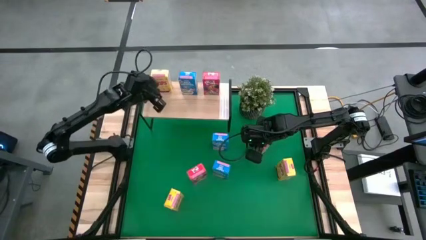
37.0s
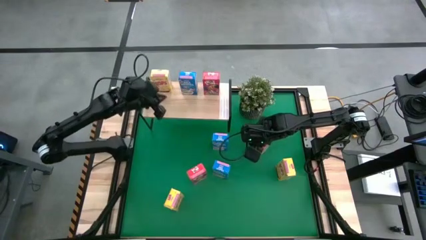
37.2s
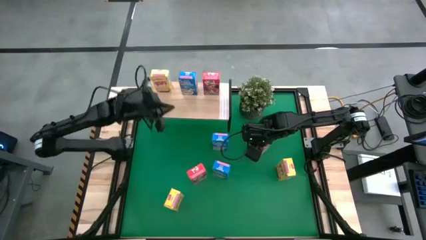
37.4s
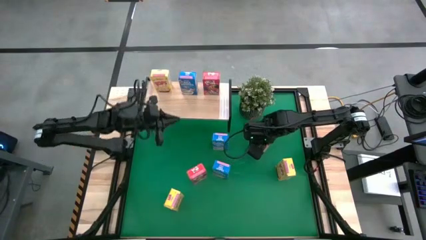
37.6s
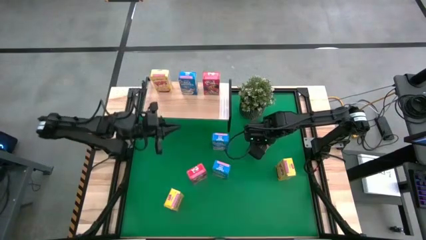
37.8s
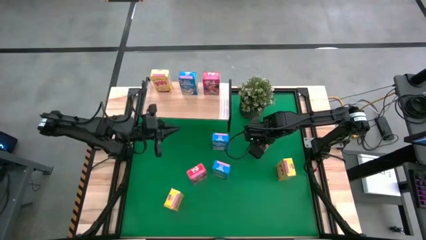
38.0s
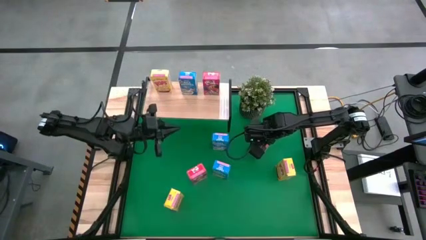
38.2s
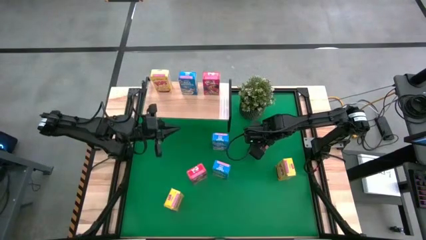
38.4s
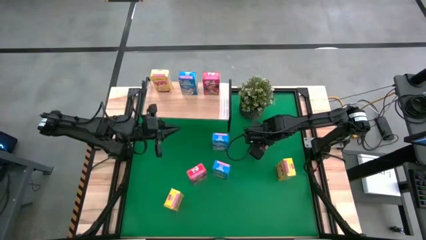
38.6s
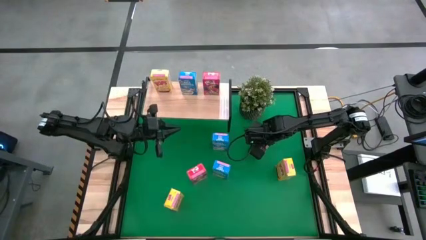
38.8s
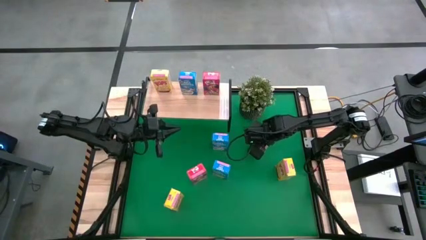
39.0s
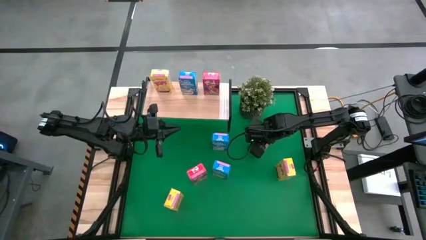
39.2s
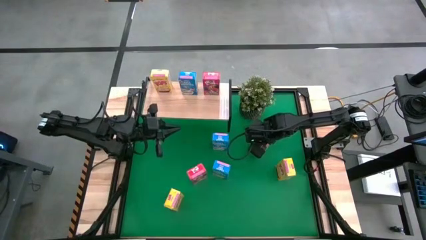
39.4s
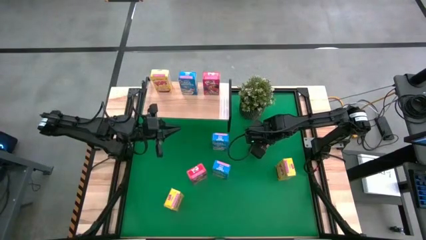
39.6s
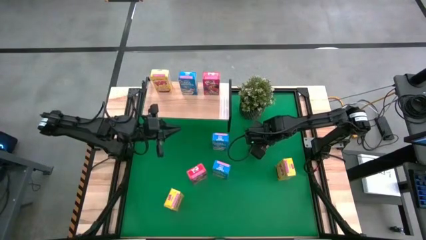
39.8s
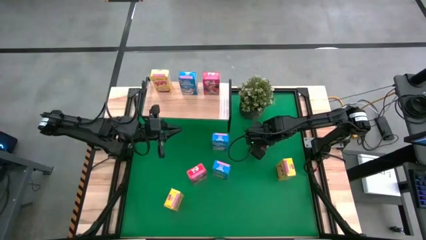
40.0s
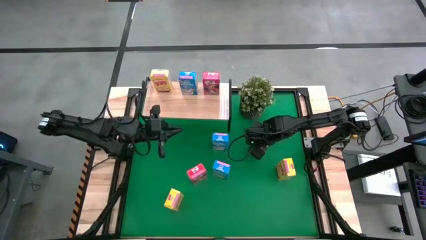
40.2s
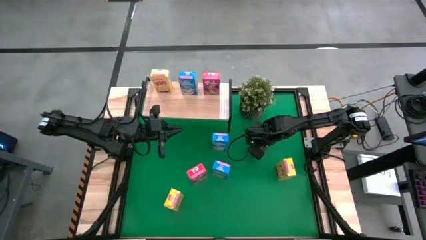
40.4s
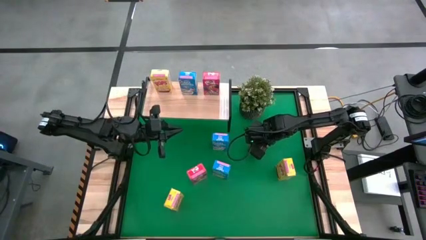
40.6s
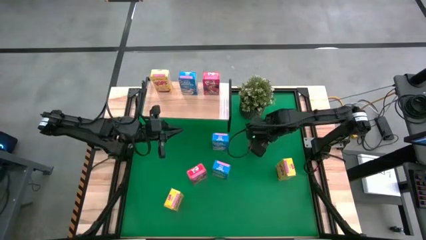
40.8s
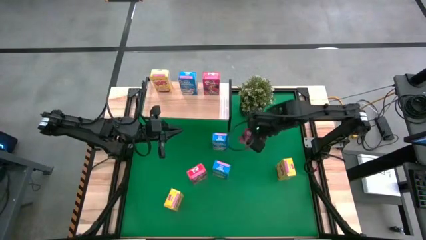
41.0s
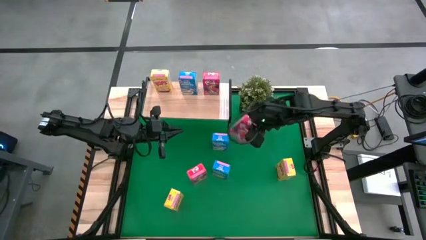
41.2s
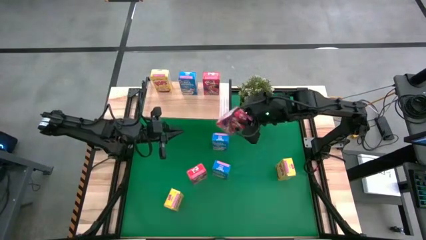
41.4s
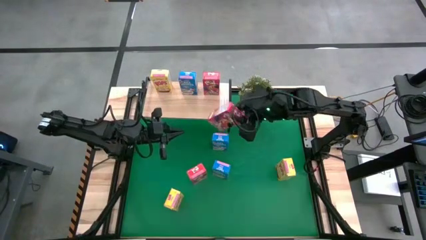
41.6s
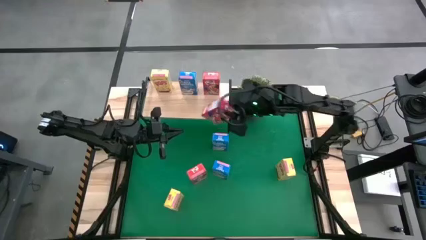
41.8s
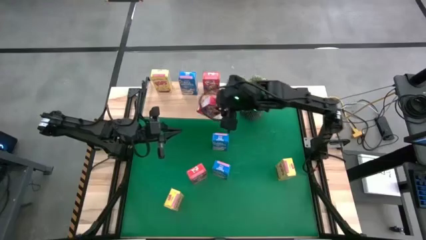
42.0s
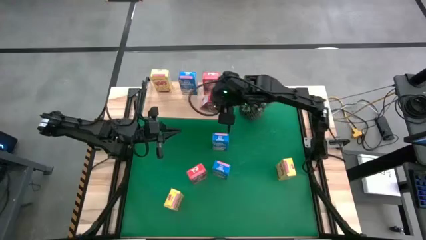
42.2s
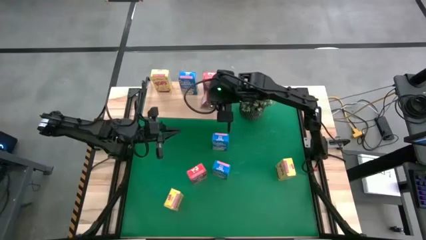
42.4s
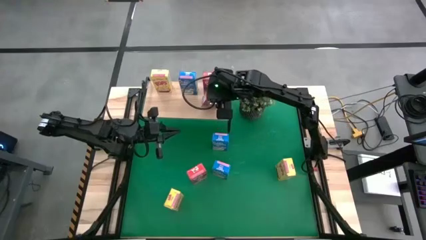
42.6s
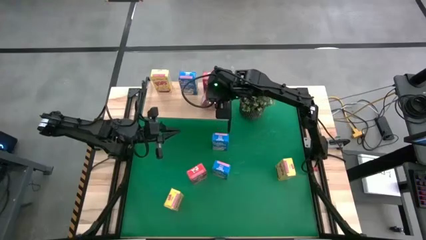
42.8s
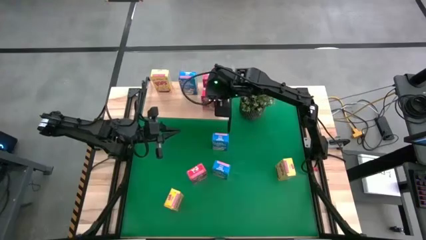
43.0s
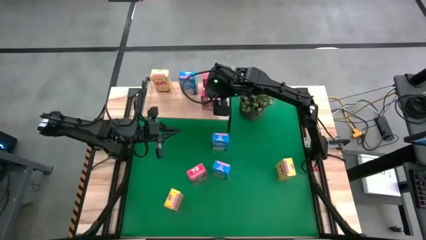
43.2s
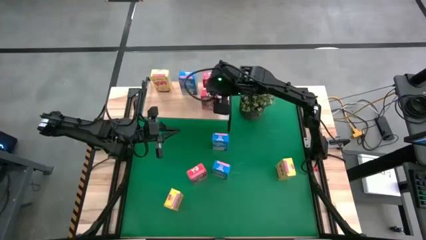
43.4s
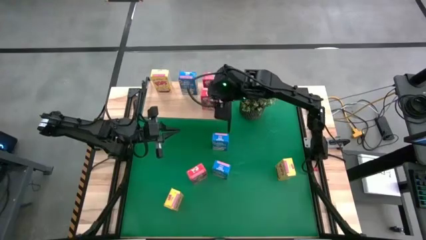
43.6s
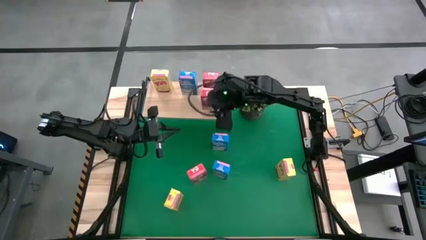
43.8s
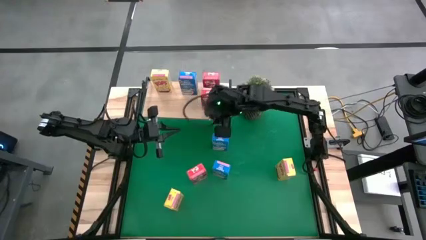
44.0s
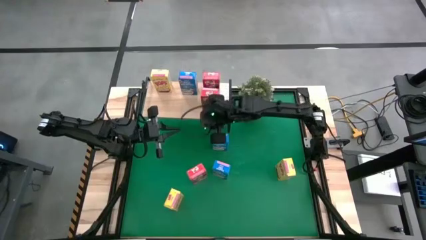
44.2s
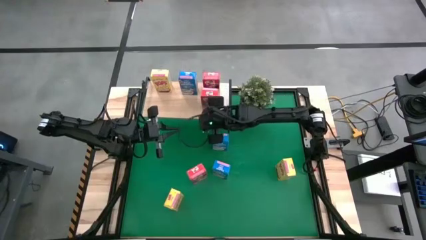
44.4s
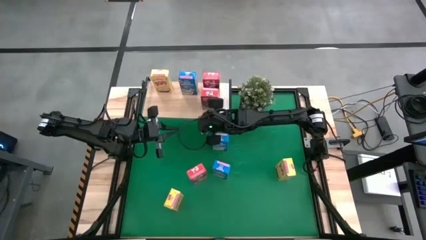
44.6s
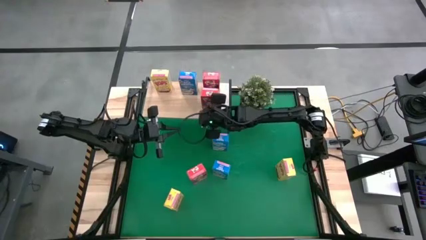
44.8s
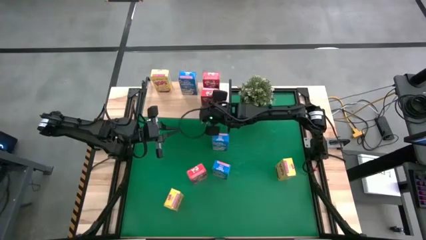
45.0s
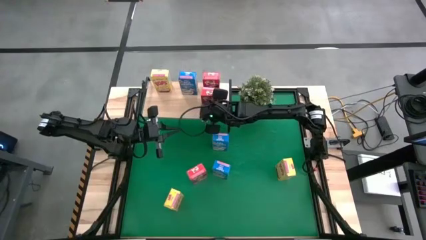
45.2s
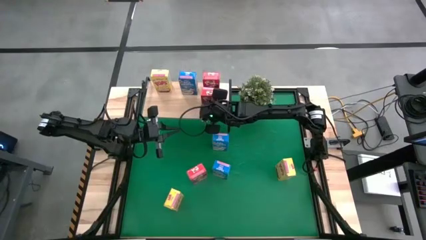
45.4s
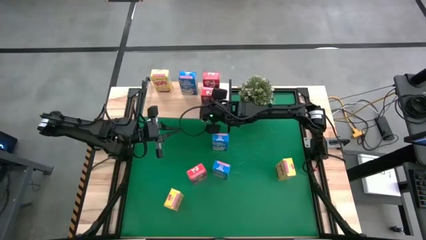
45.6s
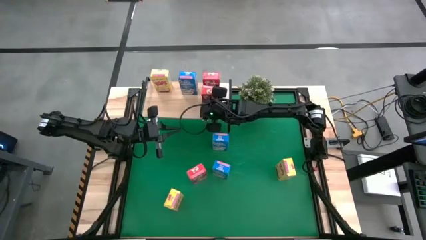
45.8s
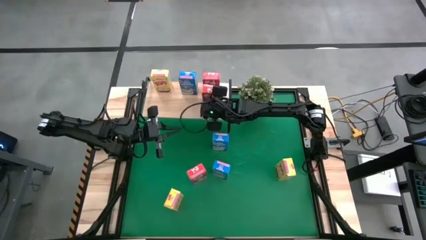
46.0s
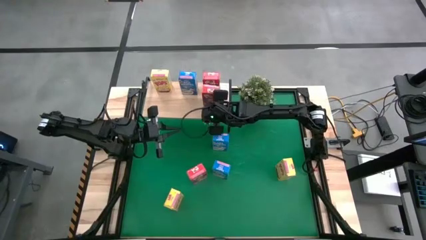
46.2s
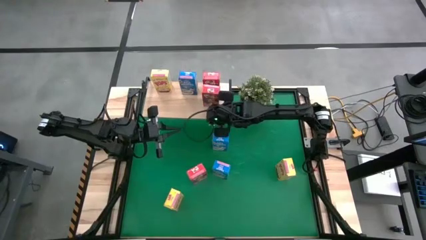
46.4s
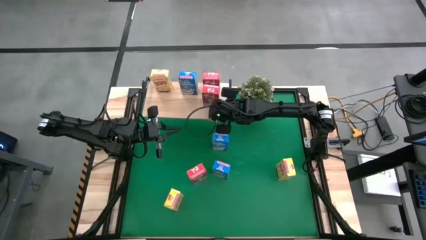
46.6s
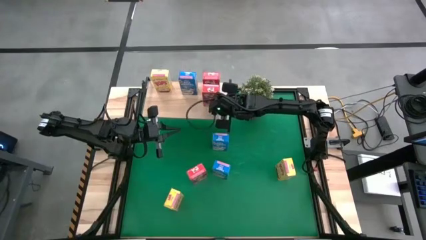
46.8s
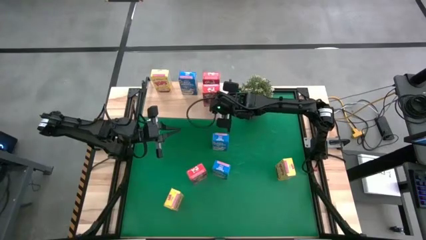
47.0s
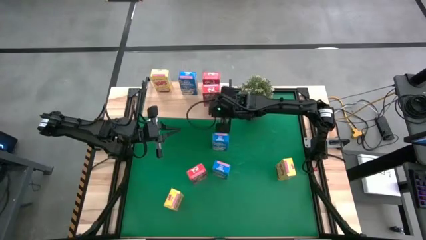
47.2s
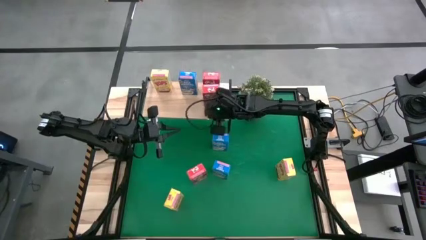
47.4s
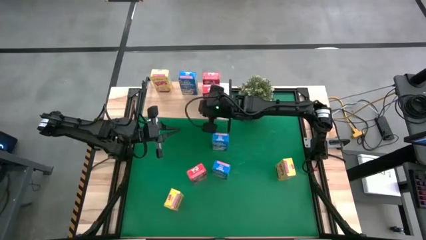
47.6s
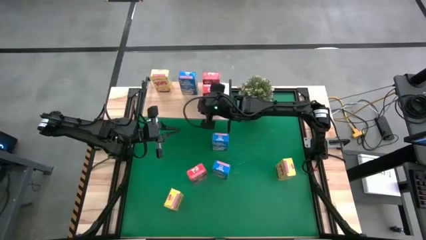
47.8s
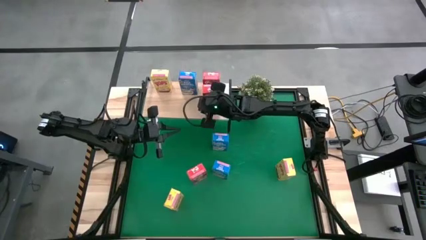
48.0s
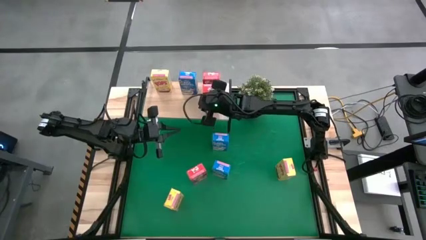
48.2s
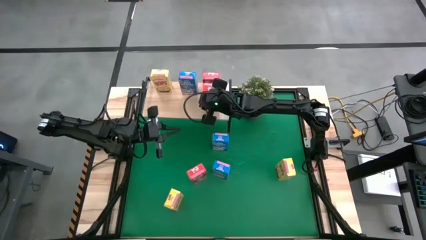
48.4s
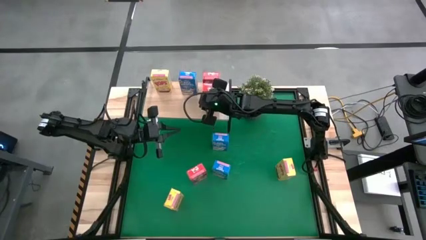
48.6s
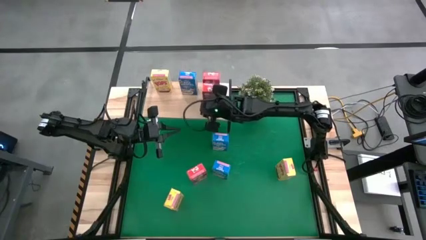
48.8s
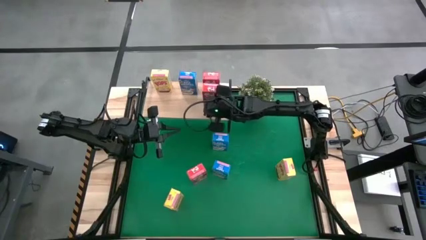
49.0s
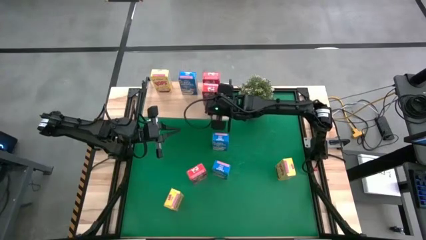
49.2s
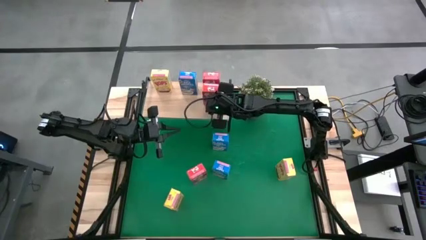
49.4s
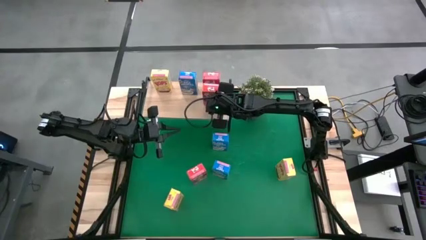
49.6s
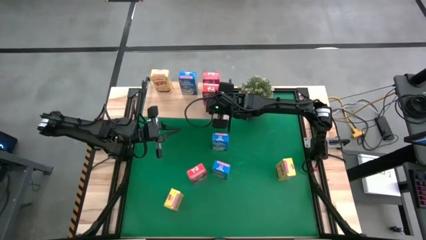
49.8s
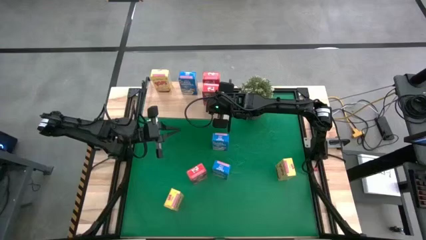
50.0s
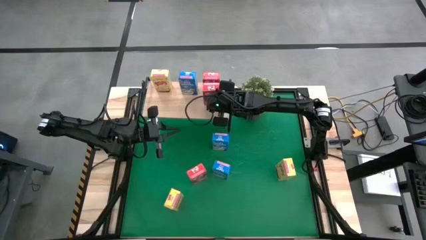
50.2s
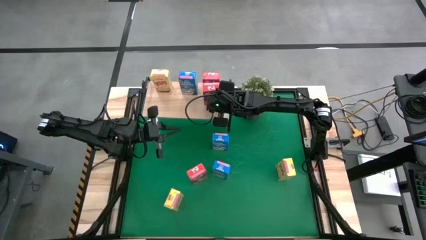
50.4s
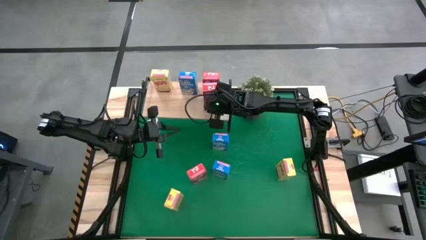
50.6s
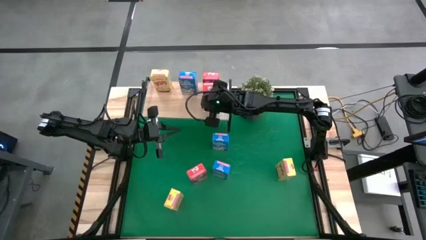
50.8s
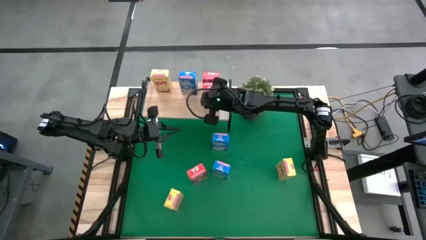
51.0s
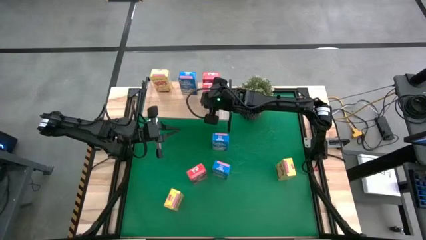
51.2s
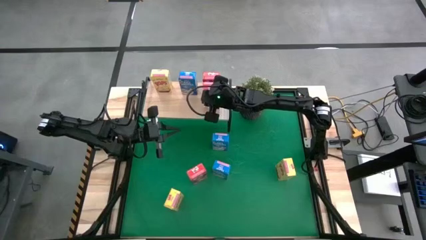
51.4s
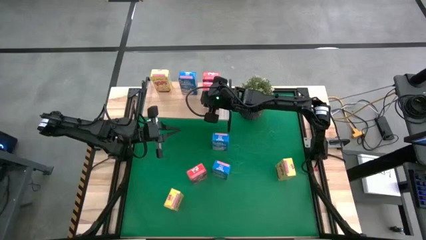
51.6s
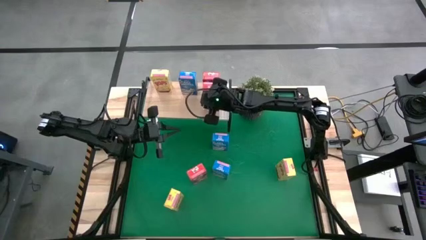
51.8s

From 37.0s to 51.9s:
Task: Stack cereal on shelf
Put the right red cereal box on the shelf aligned with the other red cereal box

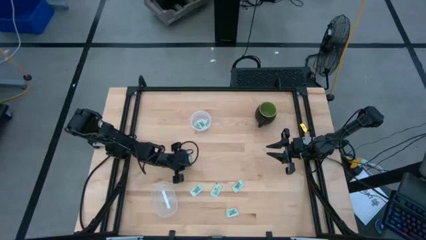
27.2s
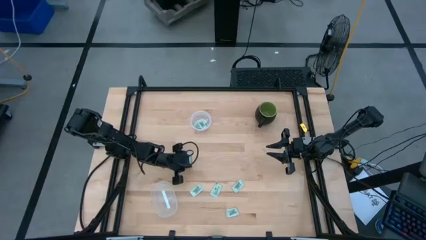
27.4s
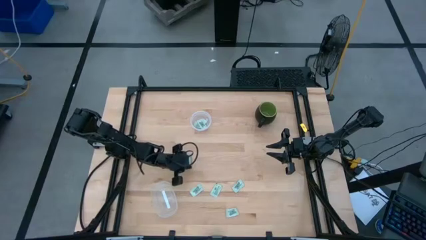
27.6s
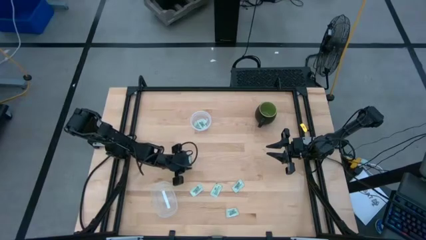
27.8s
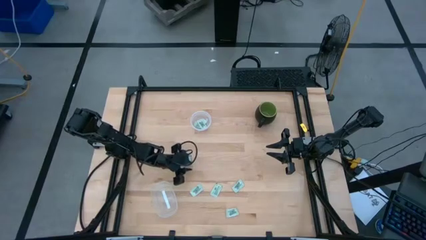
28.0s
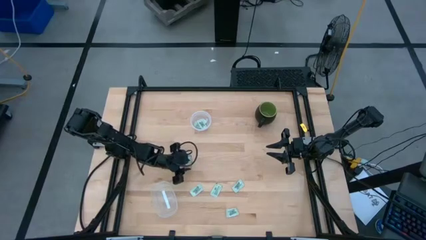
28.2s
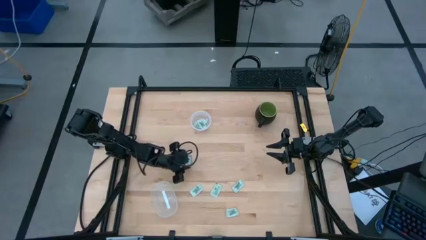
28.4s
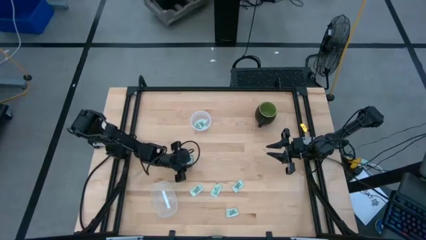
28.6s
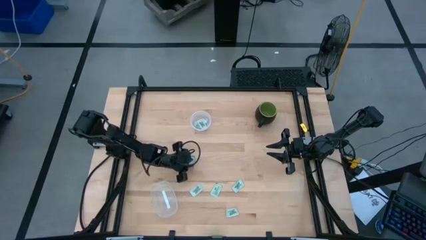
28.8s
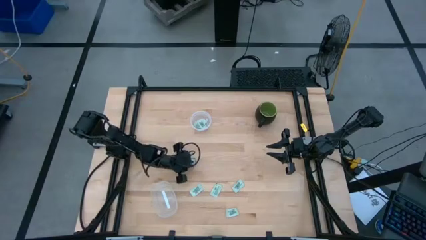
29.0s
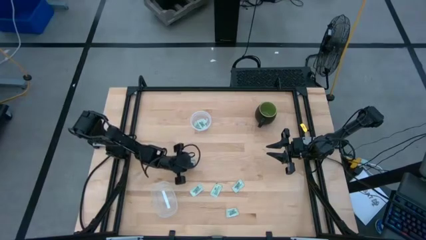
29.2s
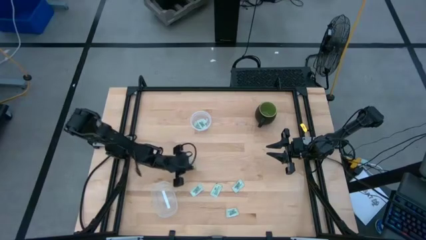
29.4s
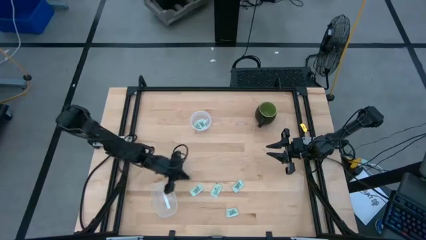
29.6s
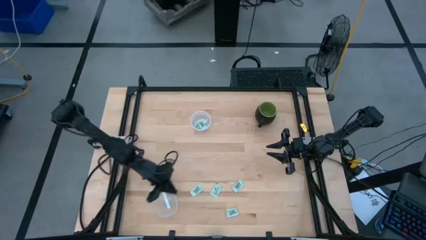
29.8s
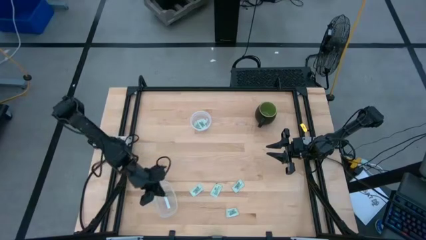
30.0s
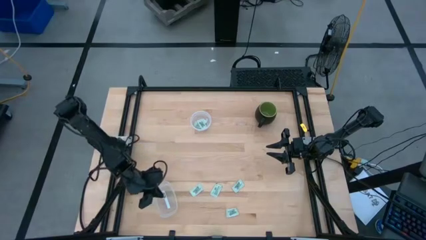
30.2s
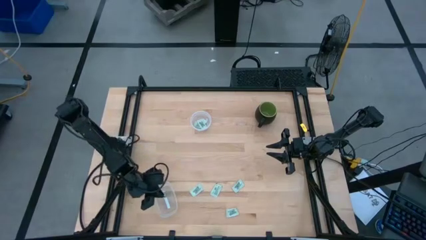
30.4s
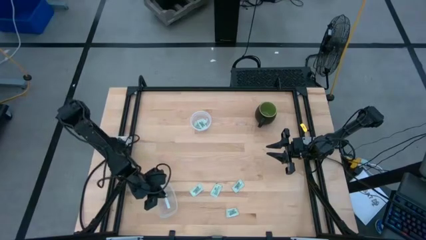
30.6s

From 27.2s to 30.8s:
Task: Pick and place Stevia / Truvia into bins
Put the stevia packet into the transparent rectangle container
